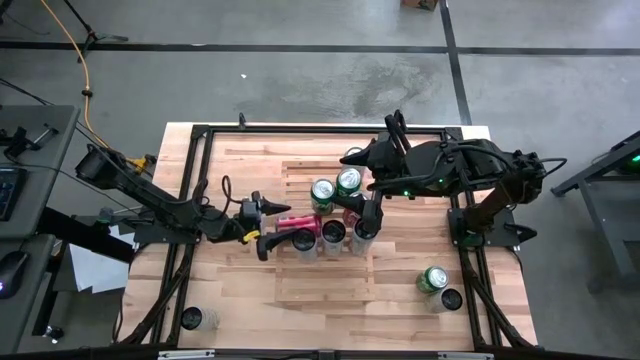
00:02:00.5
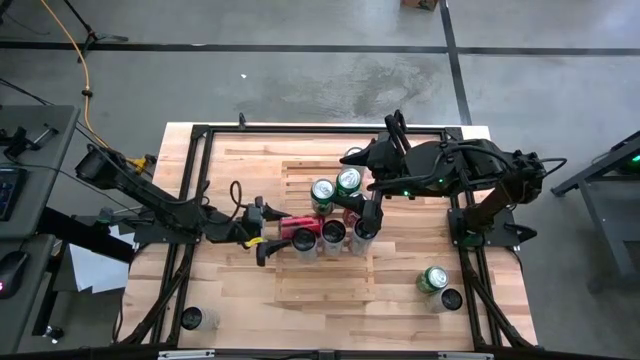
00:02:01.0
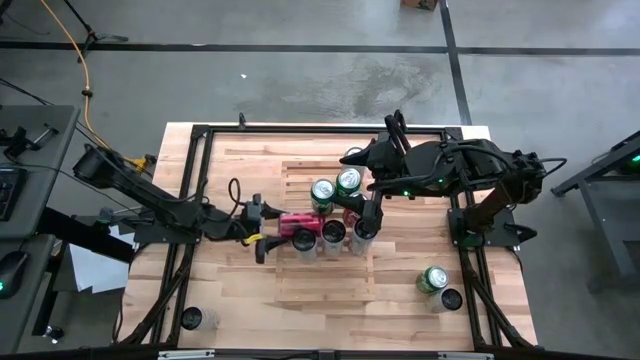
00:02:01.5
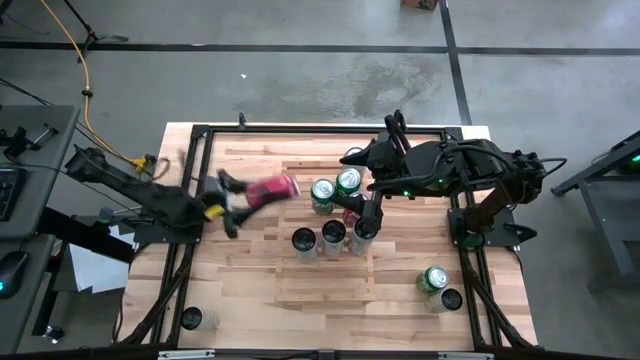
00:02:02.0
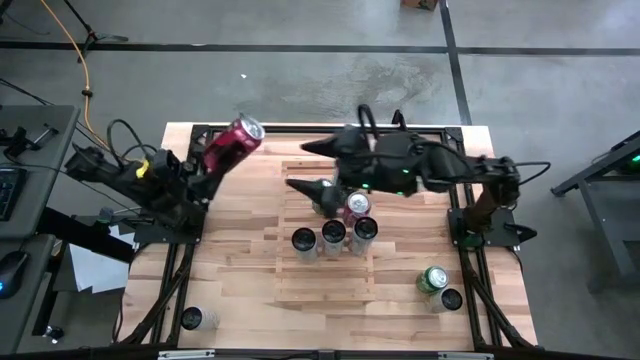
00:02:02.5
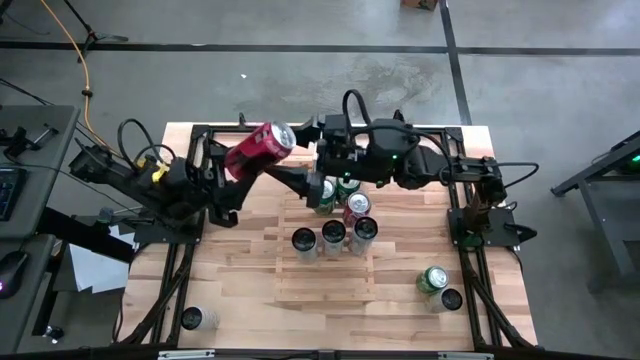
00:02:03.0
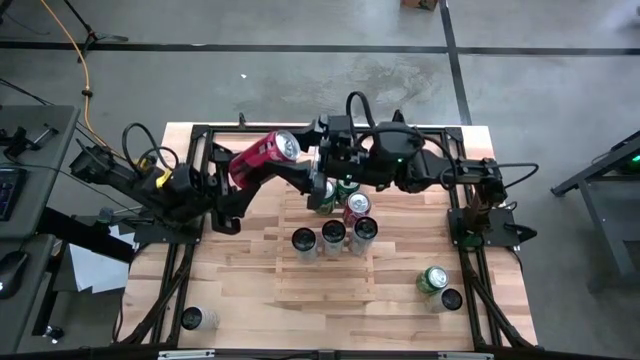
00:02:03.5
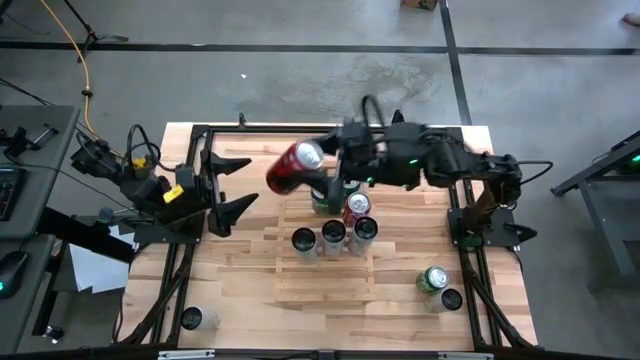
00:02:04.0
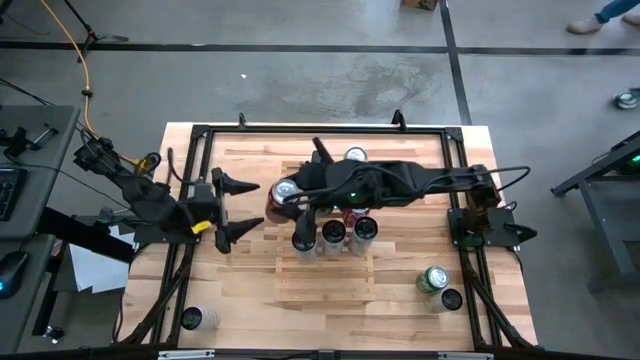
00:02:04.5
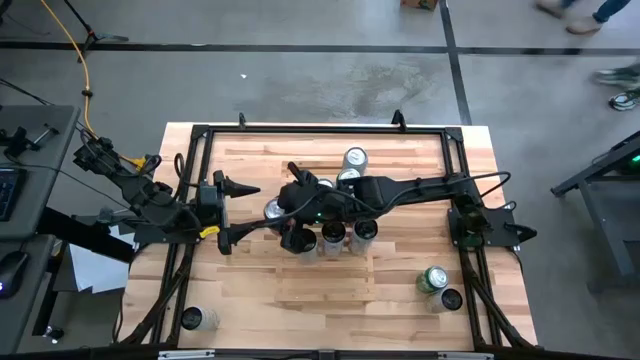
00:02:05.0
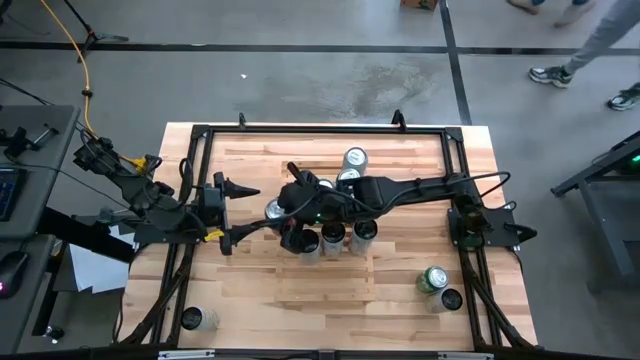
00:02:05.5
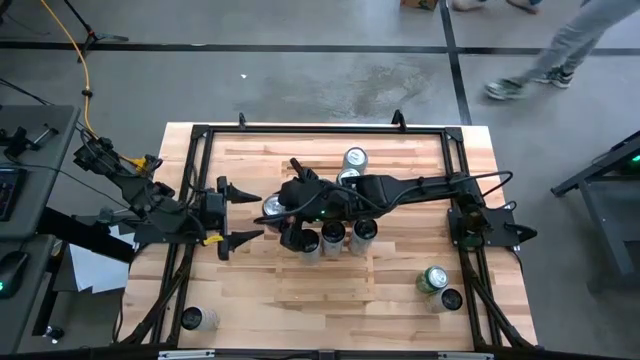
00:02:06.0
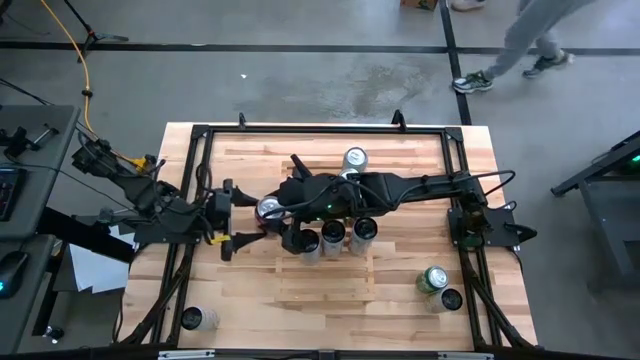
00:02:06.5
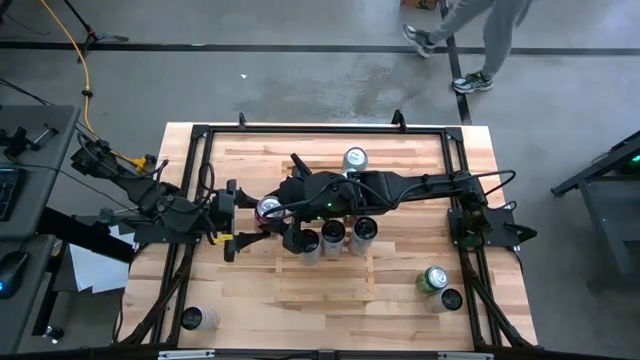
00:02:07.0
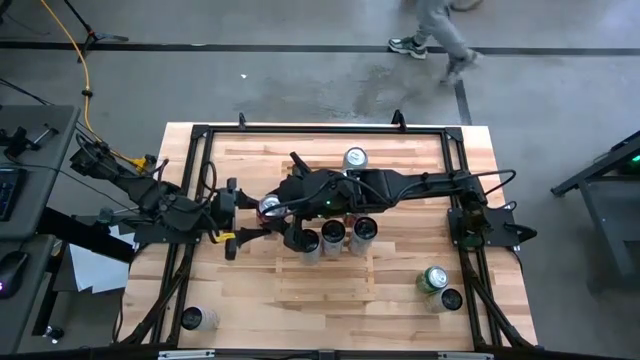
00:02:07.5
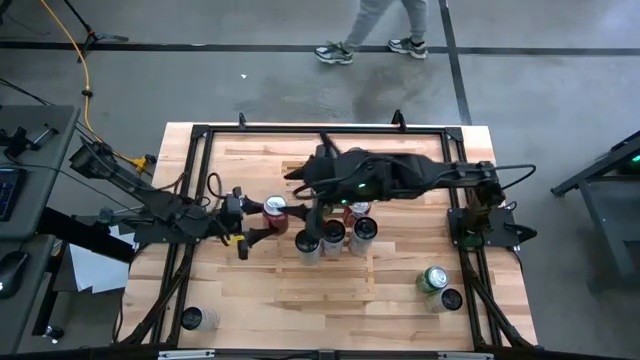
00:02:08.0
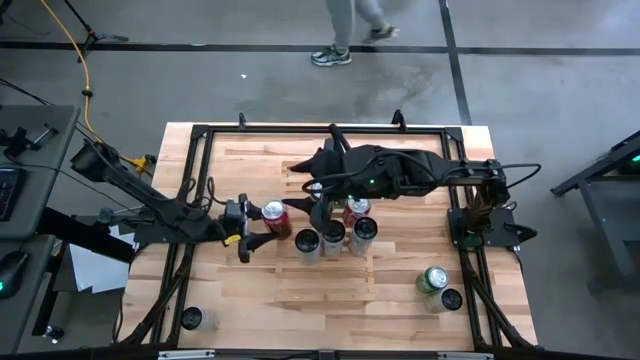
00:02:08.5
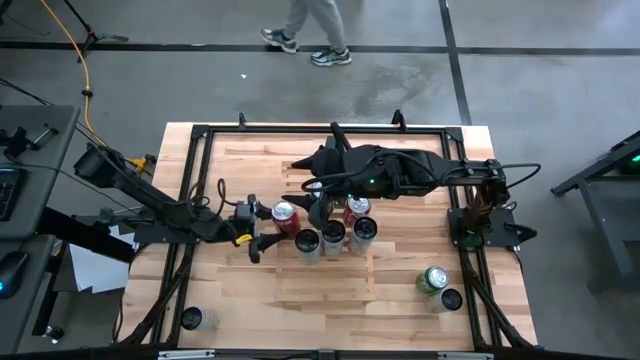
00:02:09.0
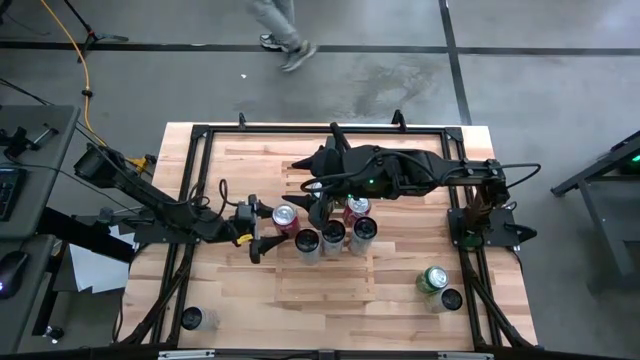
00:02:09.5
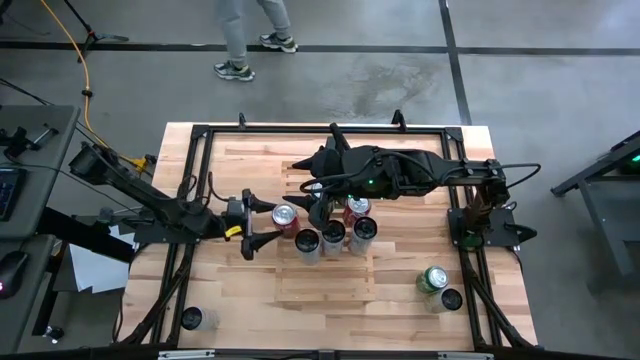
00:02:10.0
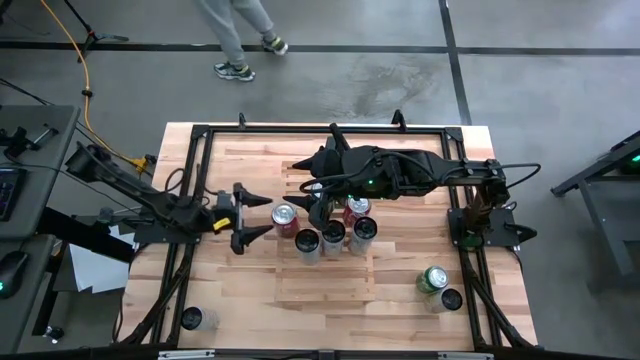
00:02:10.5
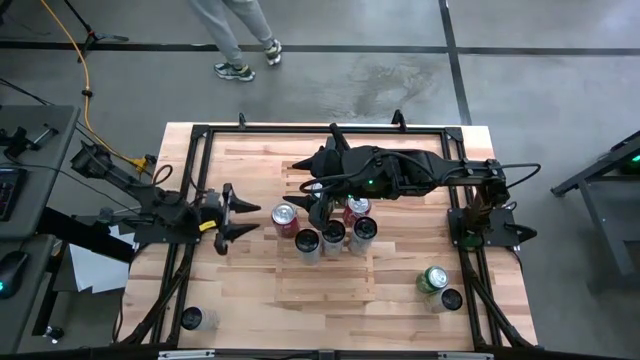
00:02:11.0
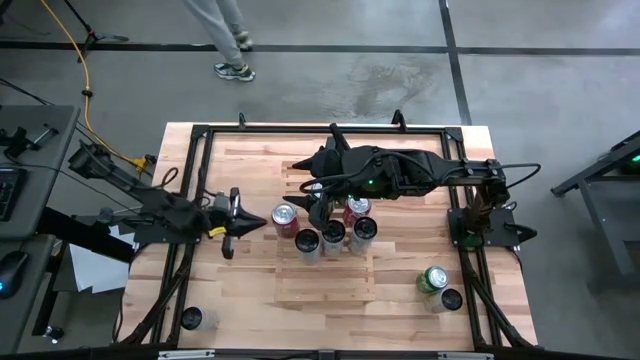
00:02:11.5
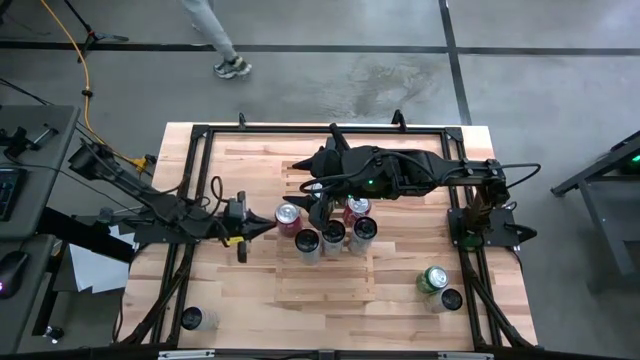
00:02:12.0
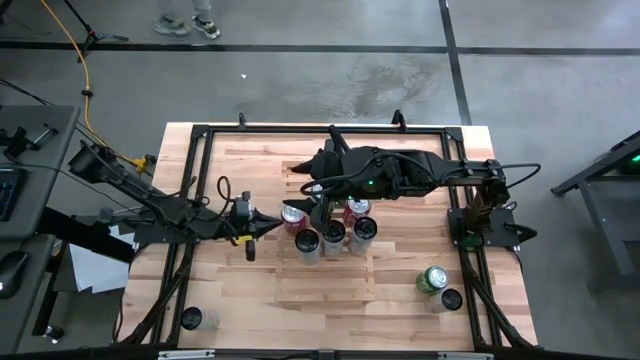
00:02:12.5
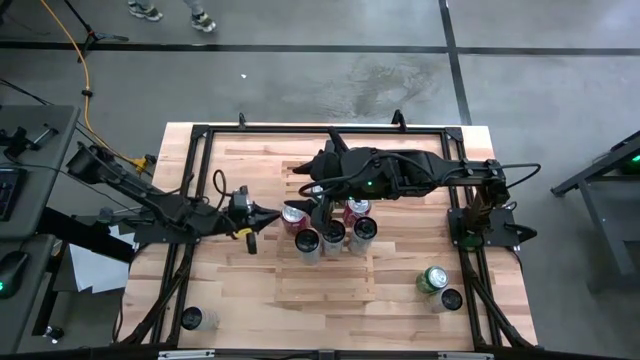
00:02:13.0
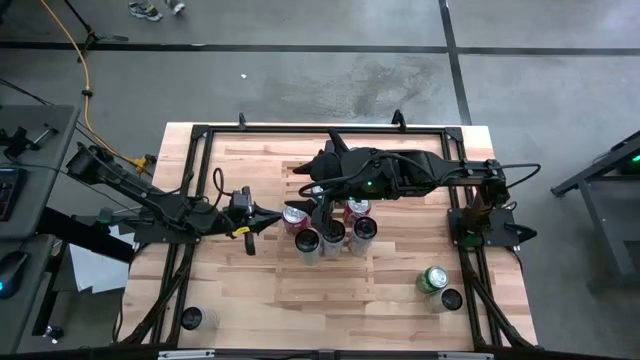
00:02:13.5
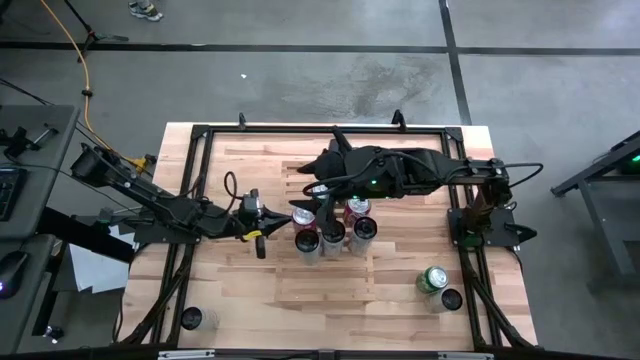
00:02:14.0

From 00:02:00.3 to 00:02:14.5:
Task: Place canned beverage on shelf
Put the red soda can on the shelf aligned with the other red soda can

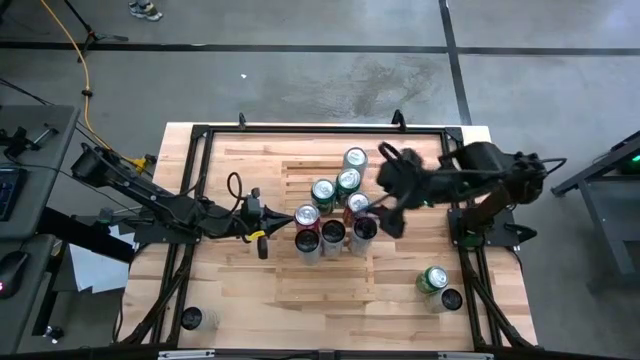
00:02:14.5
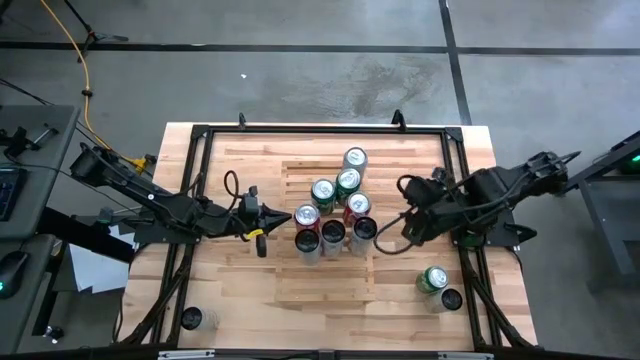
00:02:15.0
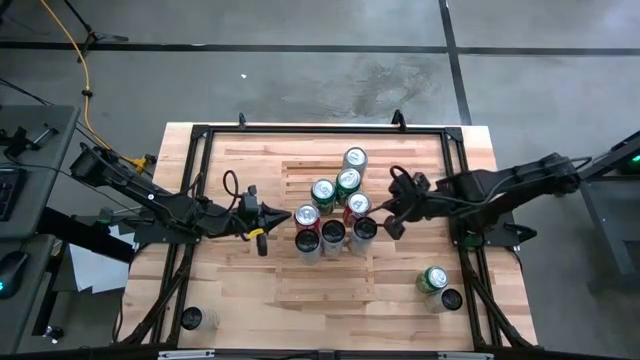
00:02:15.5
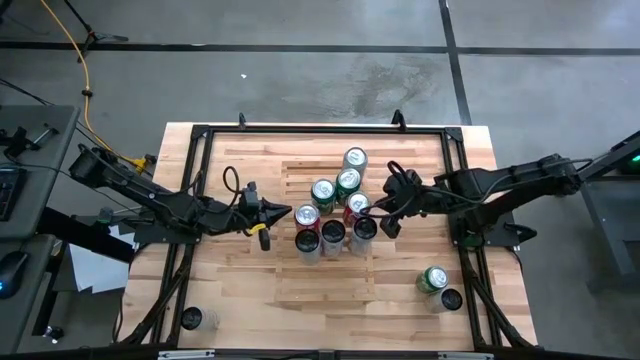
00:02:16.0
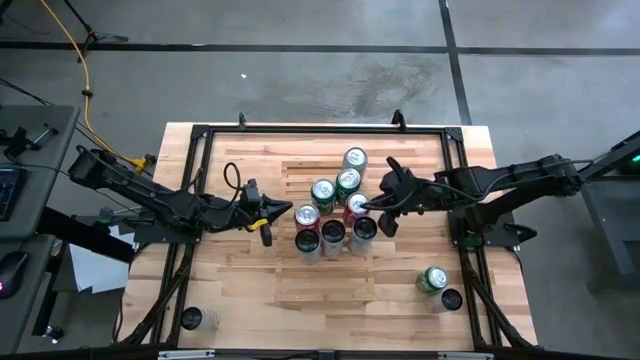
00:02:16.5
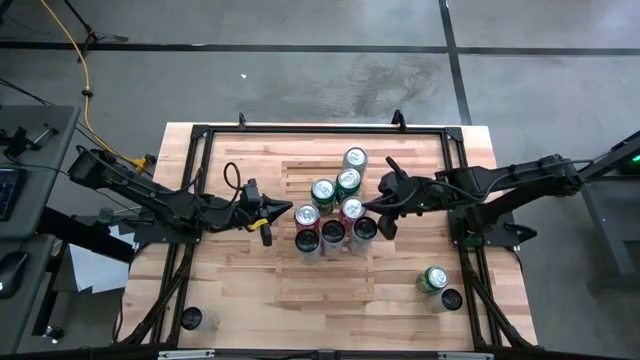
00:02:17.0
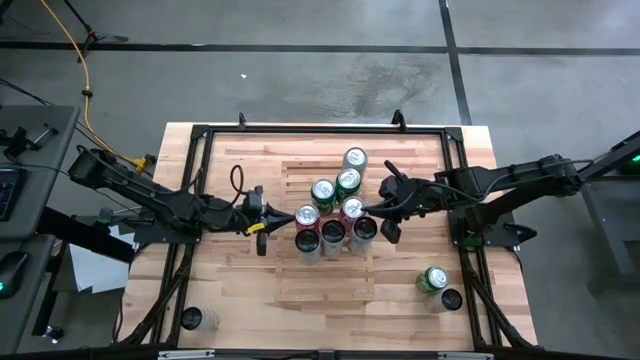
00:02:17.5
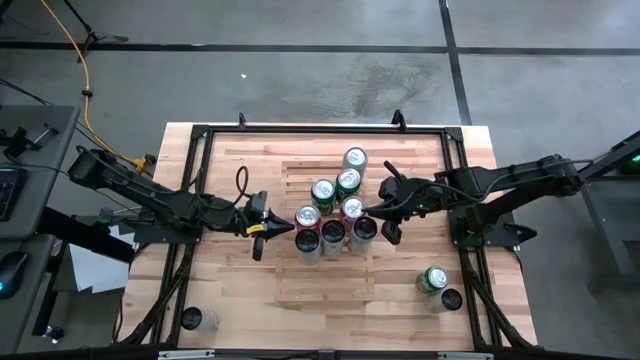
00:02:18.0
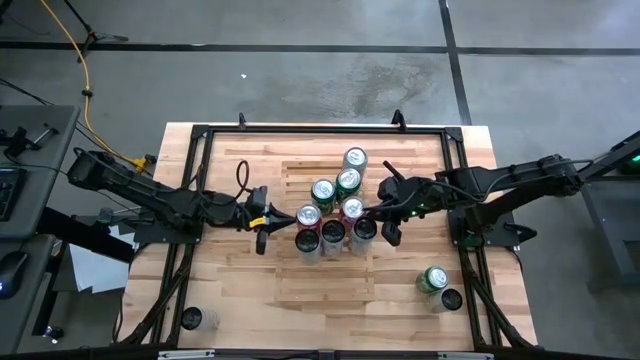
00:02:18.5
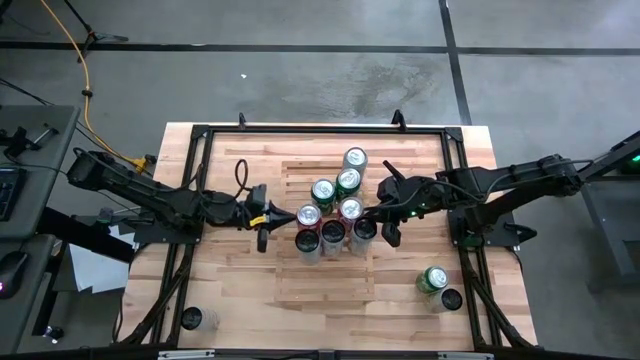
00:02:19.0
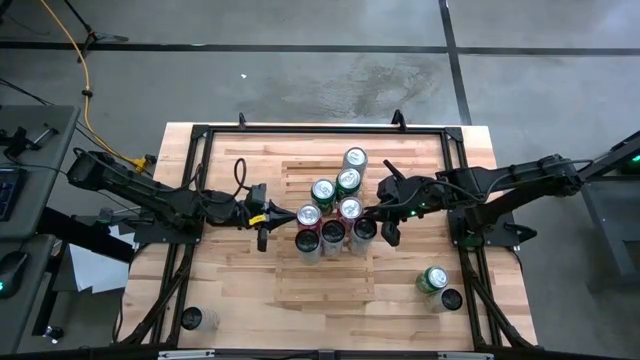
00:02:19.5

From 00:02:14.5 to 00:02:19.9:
Adjust the red soda cans

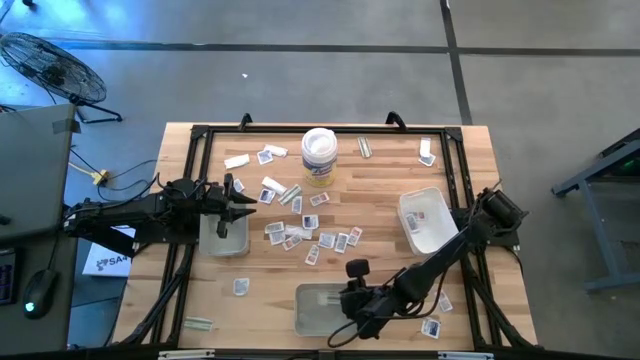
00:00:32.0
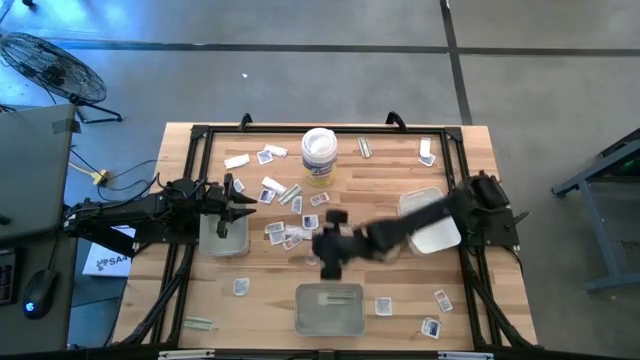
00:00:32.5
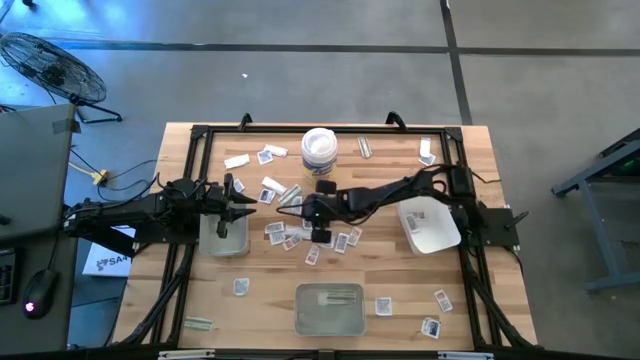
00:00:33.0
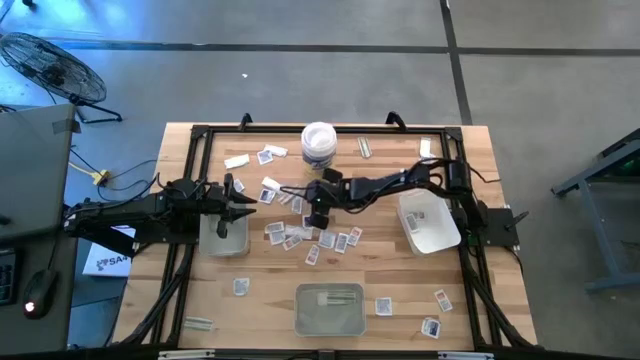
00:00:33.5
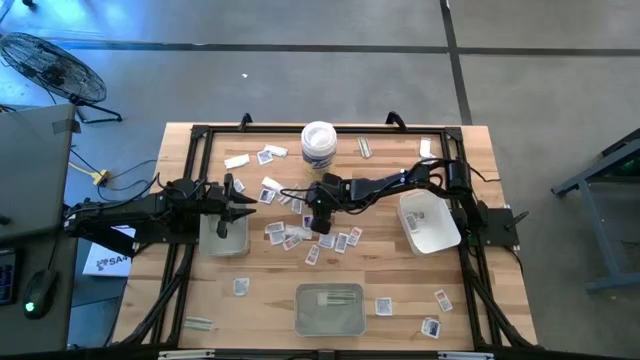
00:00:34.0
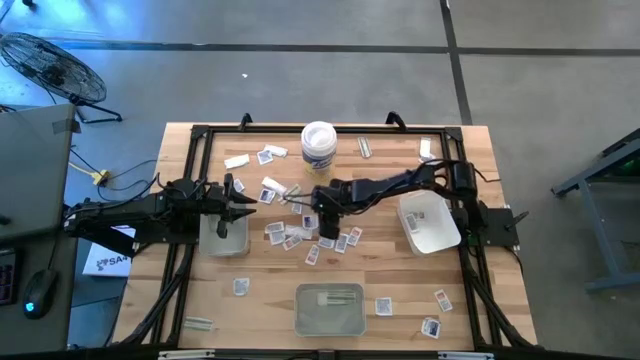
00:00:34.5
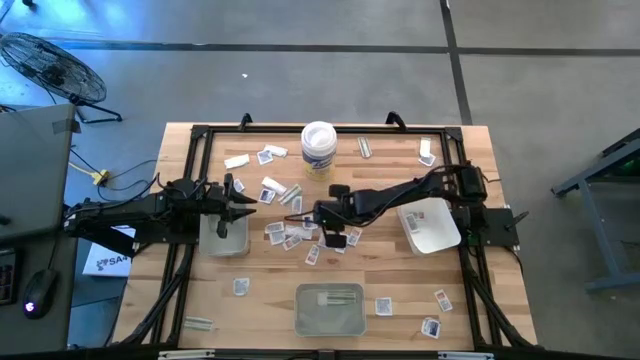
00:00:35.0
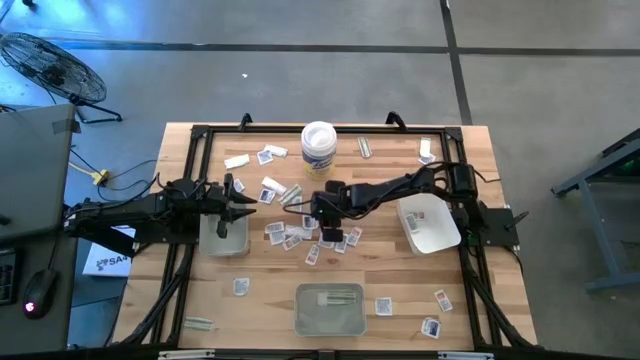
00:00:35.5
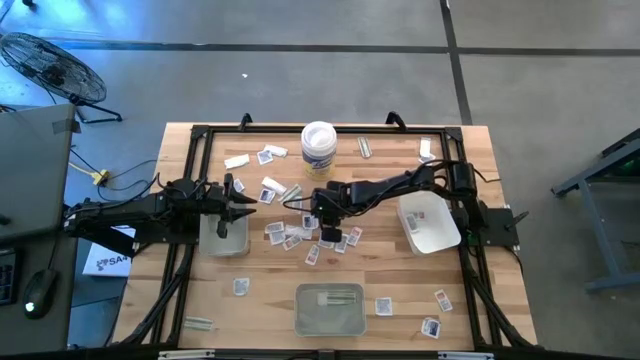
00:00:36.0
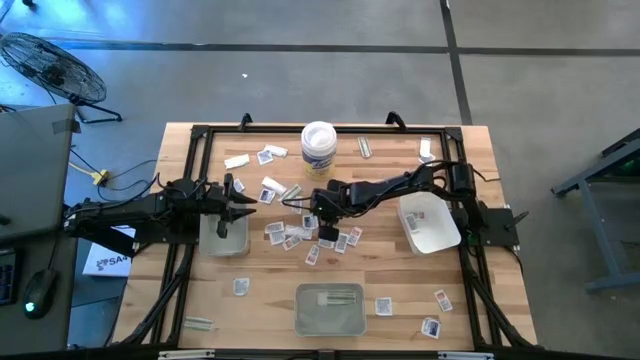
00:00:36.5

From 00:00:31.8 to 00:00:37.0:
Task: Pick & Place First Aid Supplies
Put the orange ointment pack into the white bin
